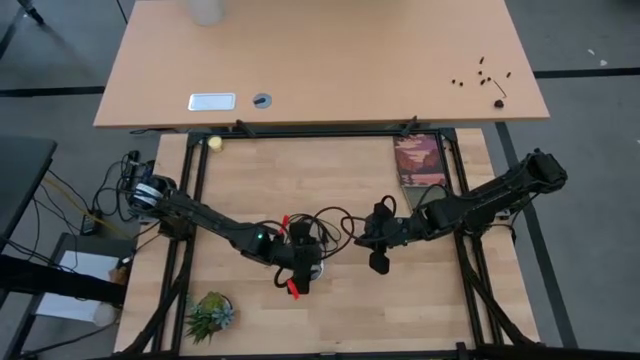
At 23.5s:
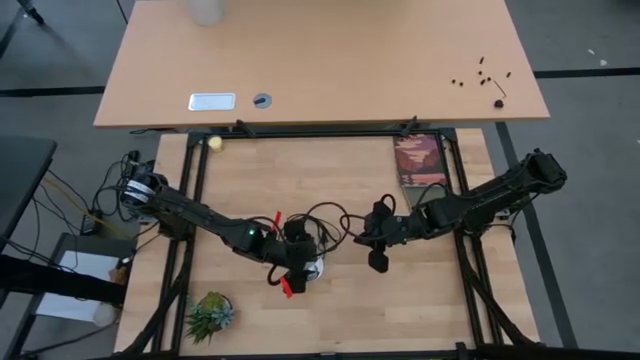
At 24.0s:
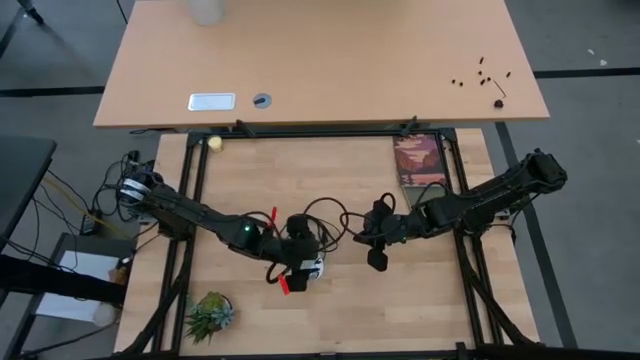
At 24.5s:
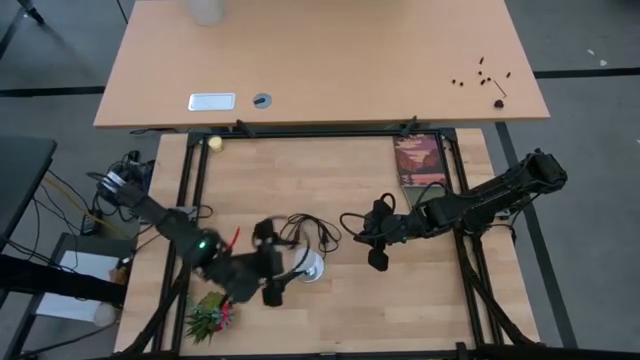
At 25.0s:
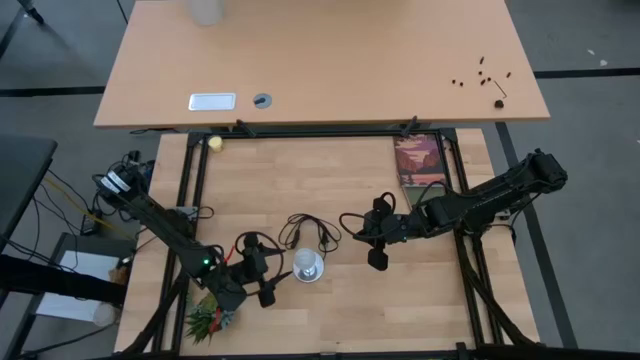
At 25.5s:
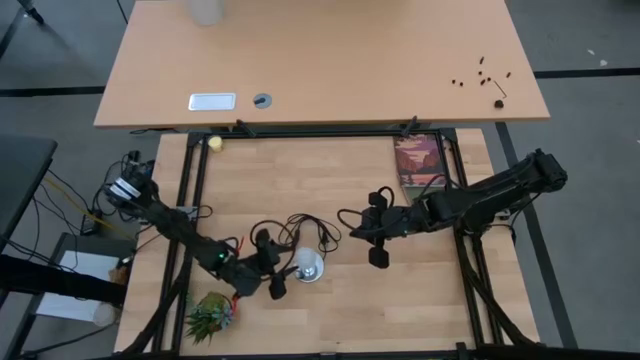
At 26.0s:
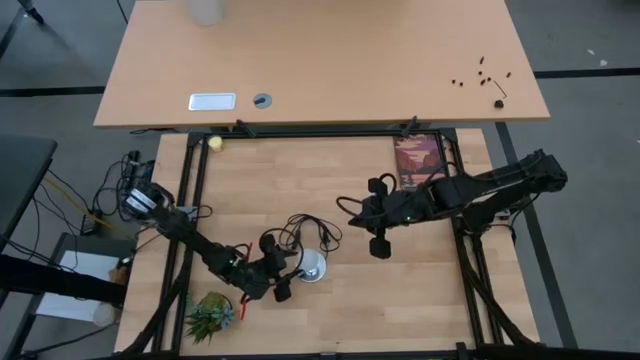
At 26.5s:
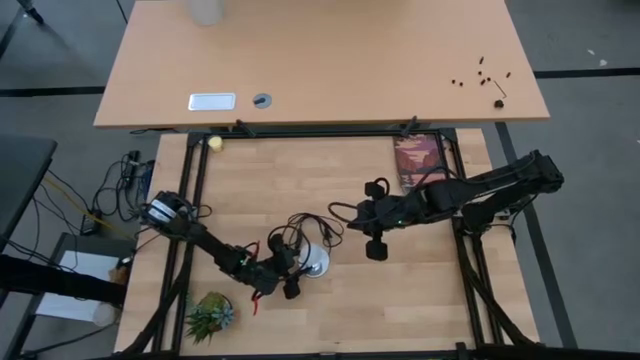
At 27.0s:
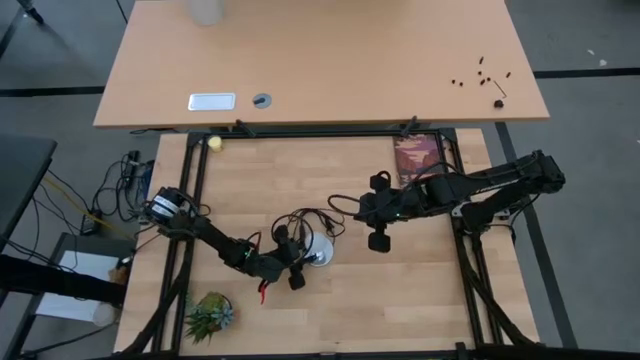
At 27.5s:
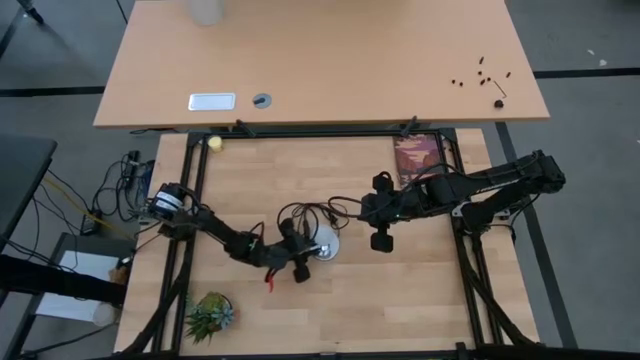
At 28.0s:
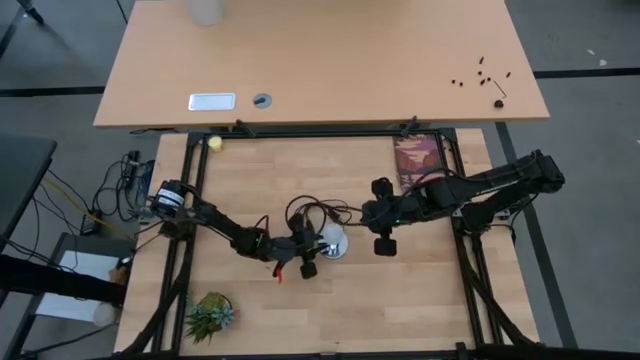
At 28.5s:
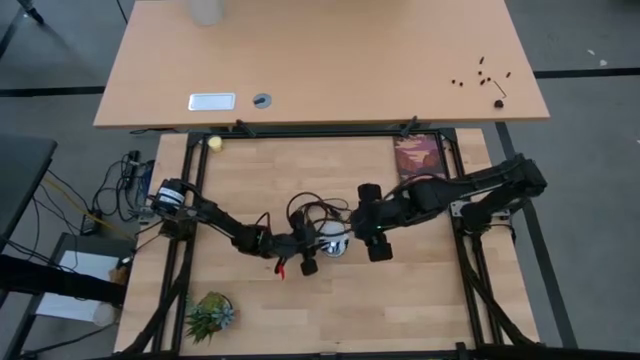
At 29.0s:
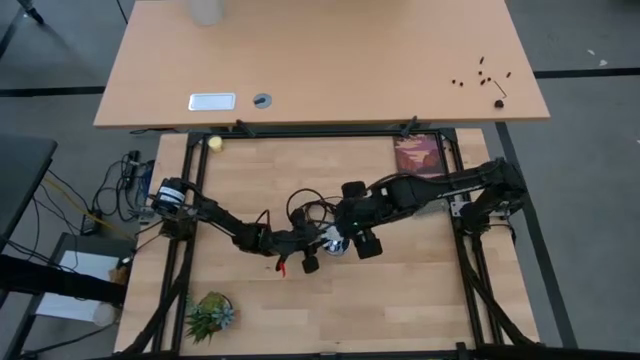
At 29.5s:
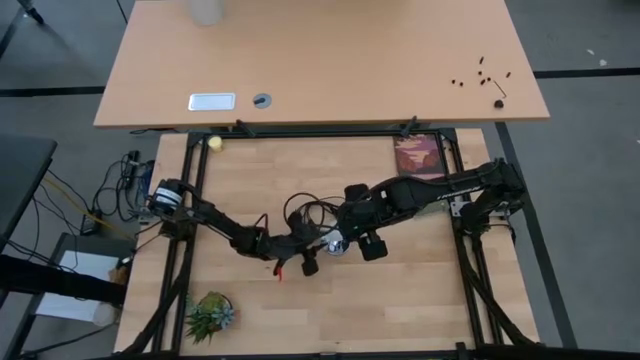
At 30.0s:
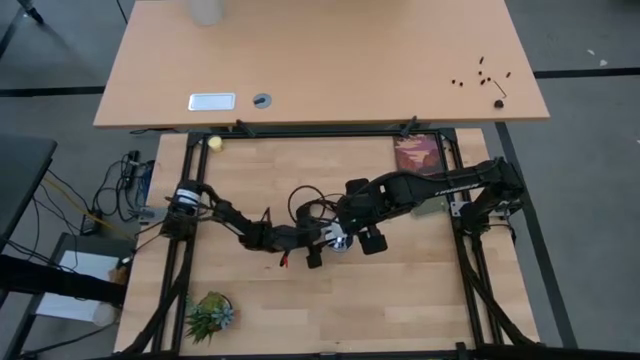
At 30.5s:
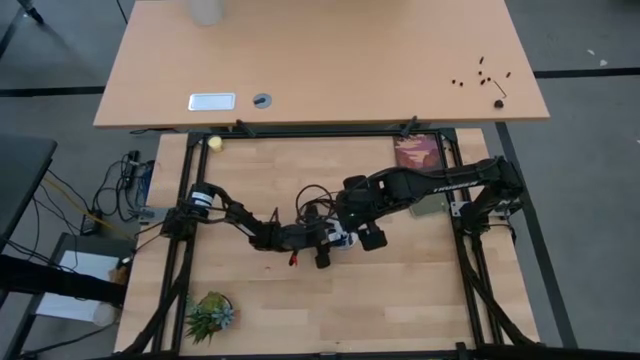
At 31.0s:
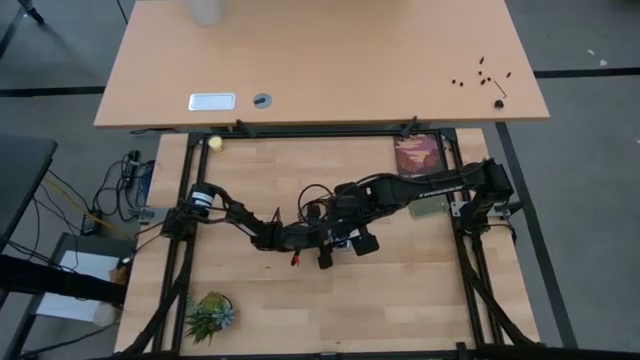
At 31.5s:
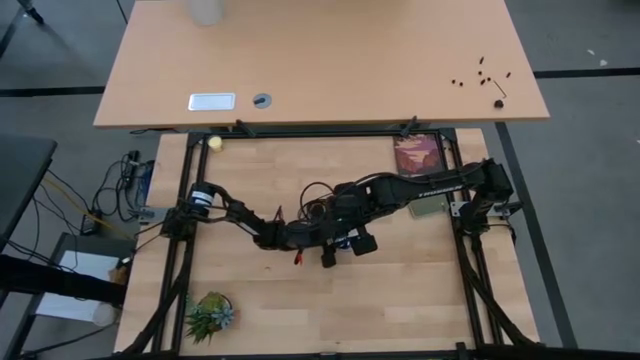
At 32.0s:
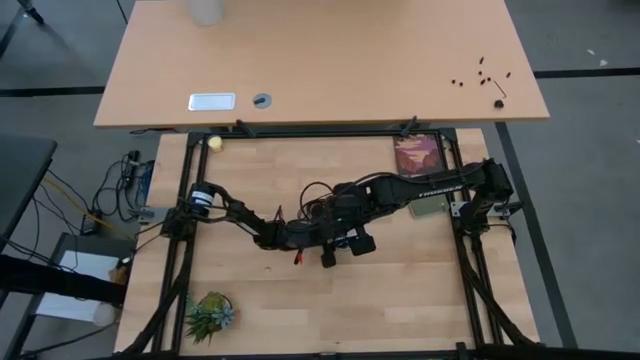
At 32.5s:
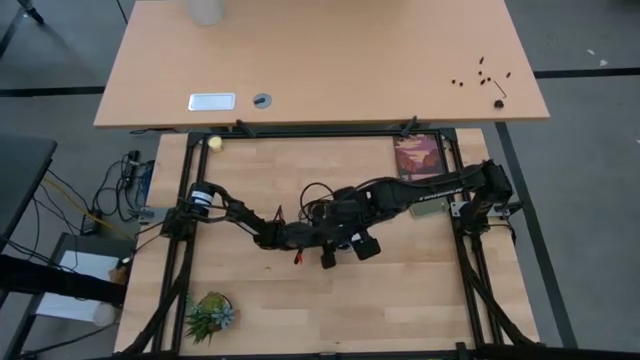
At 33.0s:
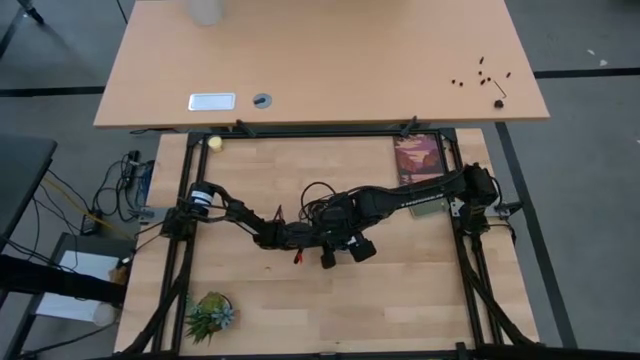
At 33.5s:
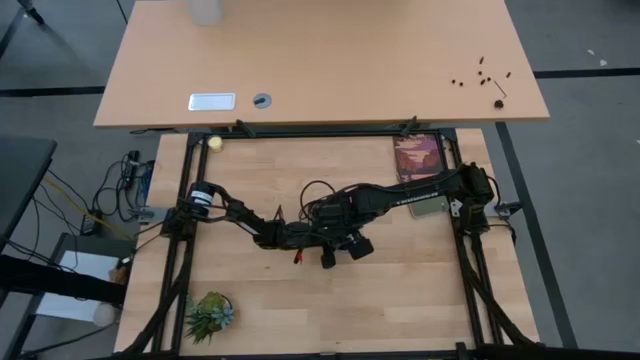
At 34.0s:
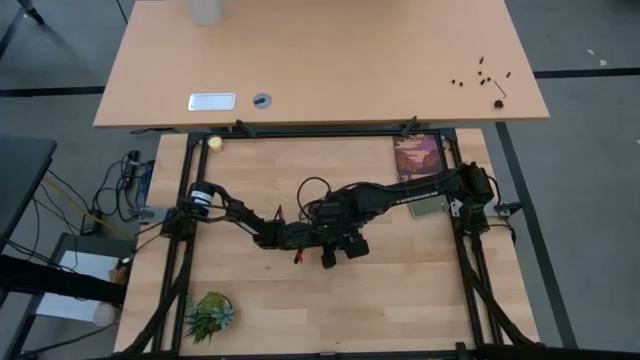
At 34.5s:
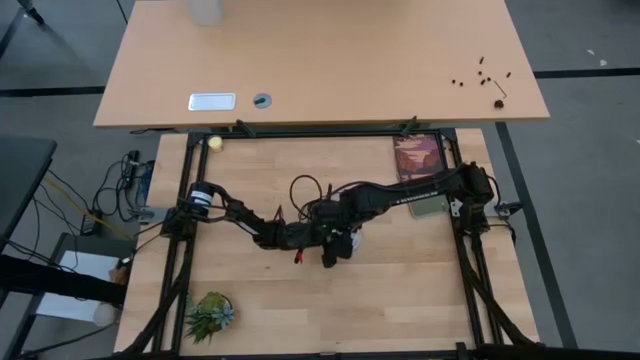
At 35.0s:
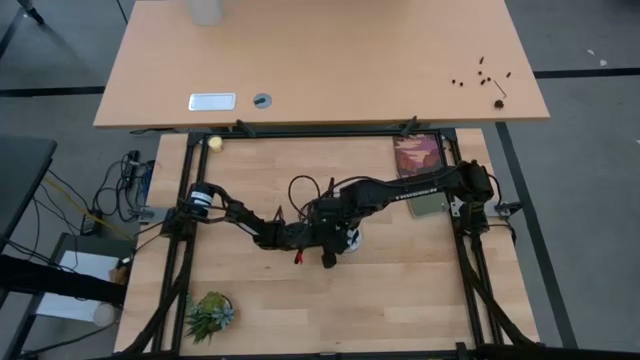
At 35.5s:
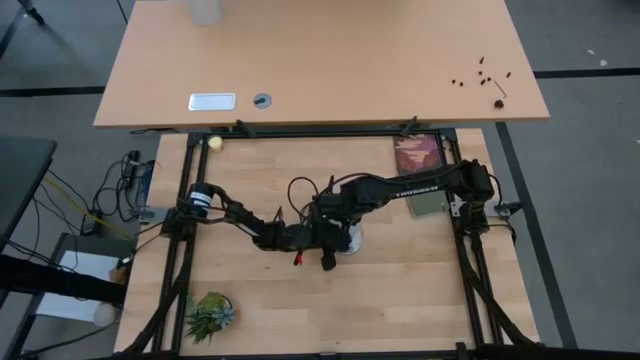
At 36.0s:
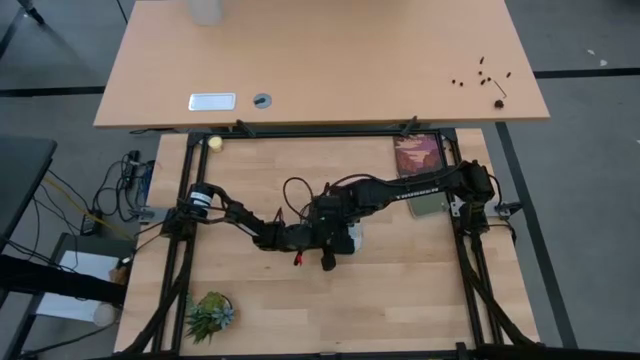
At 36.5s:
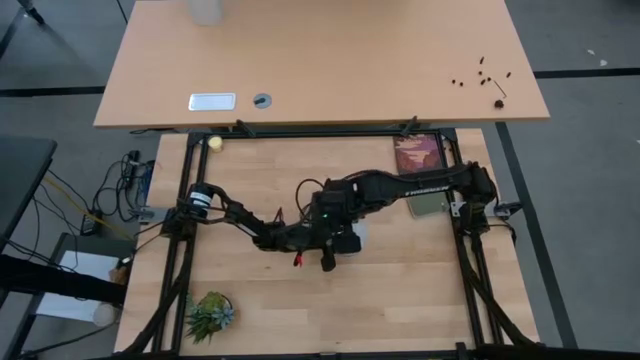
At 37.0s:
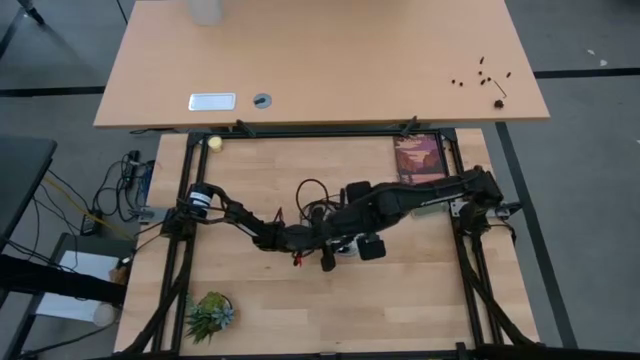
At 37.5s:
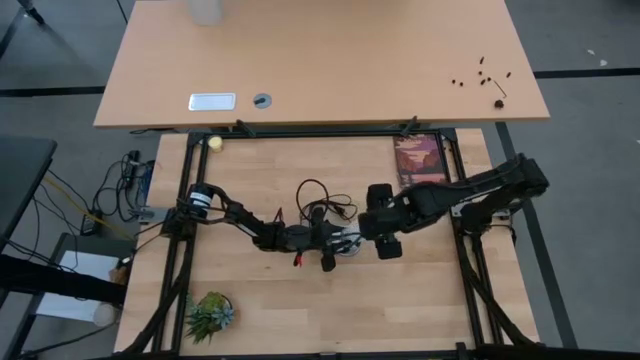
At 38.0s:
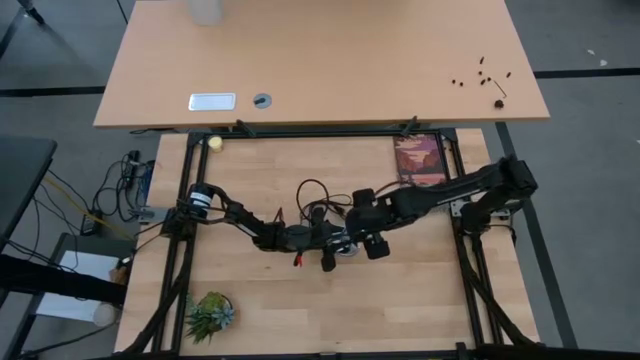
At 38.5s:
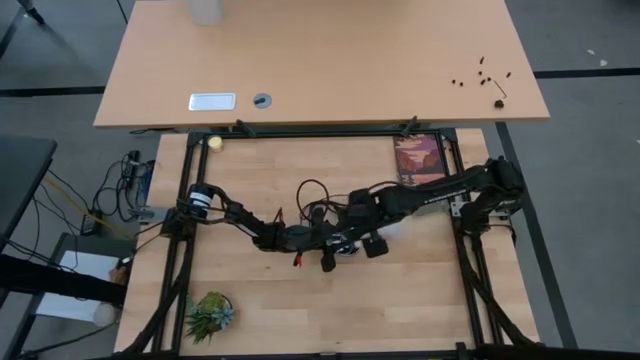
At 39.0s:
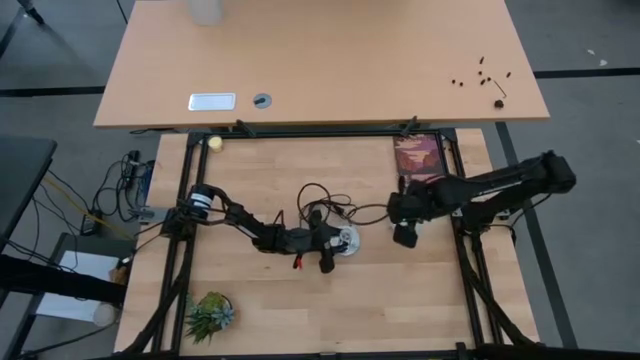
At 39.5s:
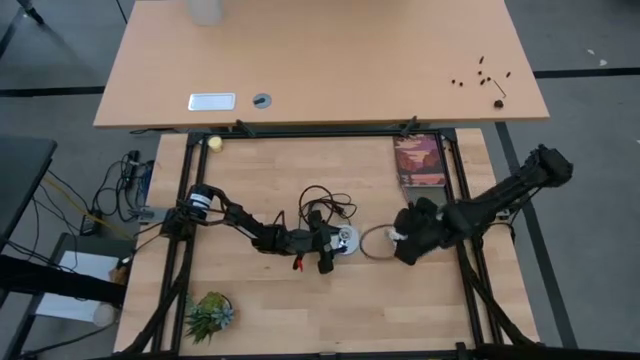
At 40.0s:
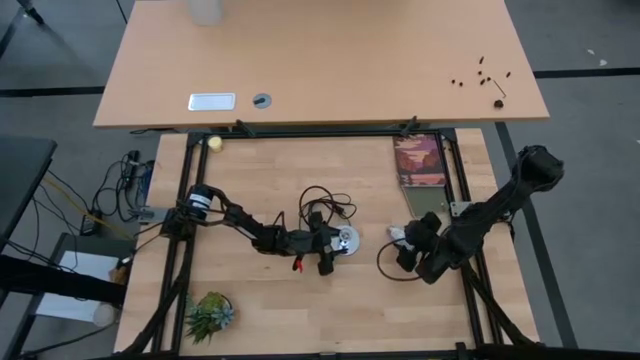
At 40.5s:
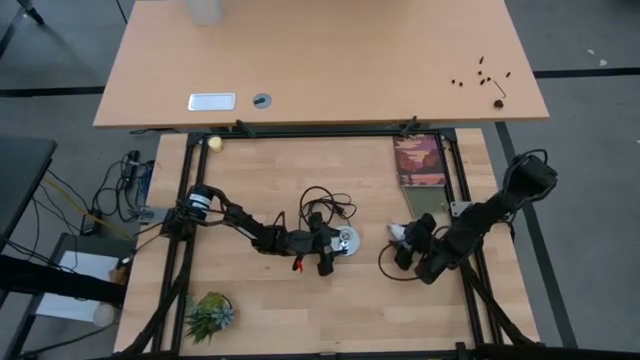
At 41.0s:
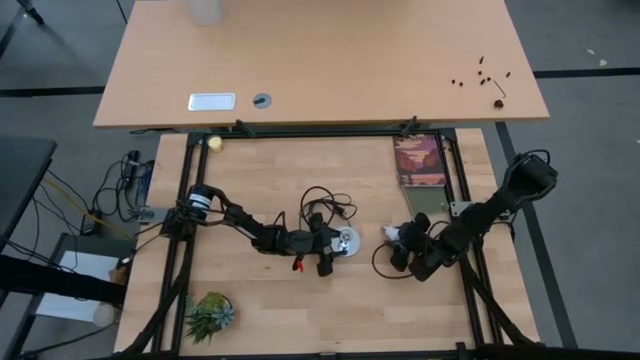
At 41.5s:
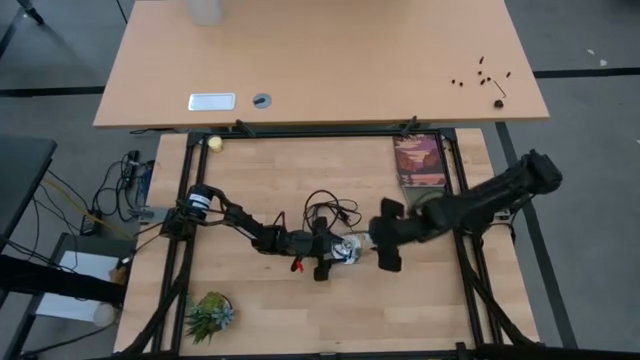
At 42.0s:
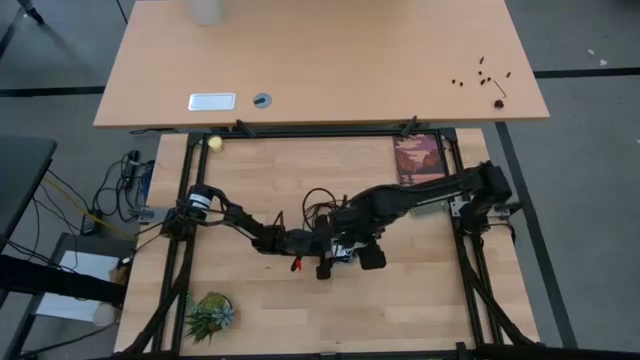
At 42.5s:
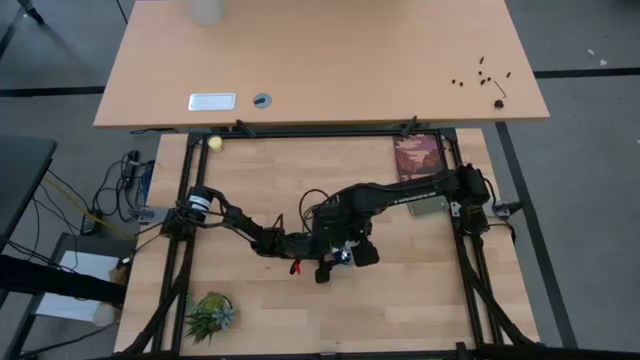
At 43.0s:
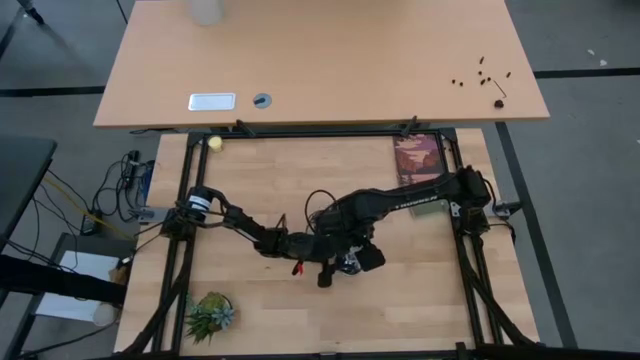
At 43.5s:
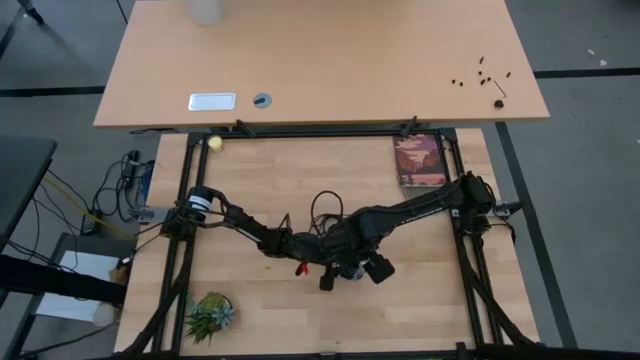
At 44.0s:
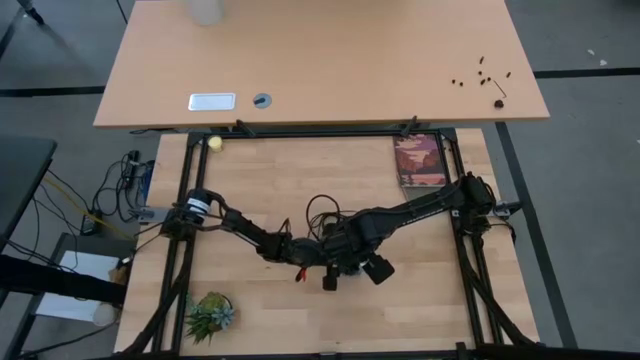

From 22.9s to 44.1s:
Task: Screw lightbulb
Insert the lightbulb into the silver lamp
